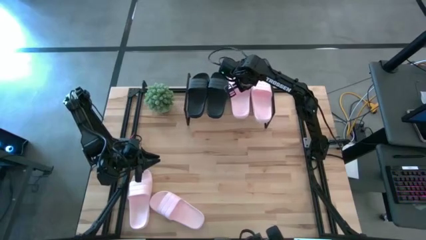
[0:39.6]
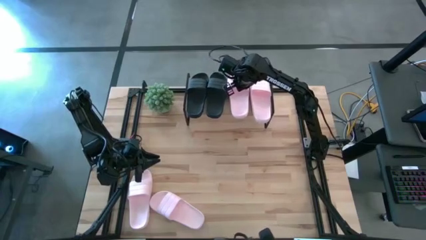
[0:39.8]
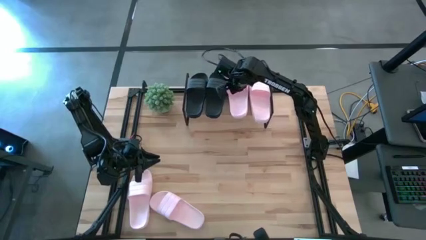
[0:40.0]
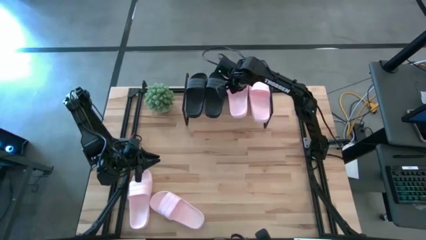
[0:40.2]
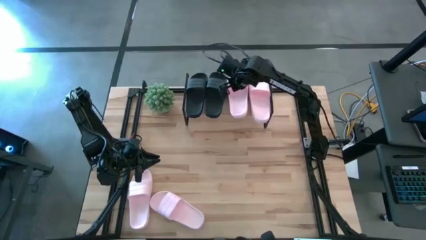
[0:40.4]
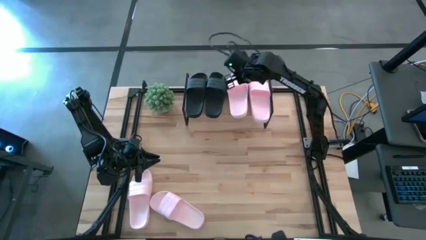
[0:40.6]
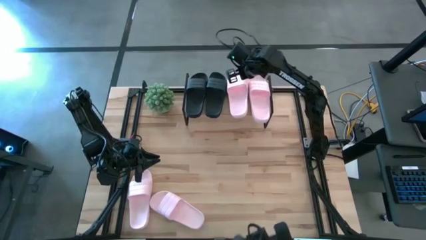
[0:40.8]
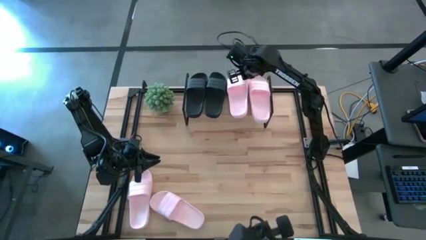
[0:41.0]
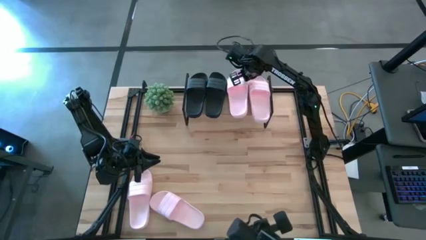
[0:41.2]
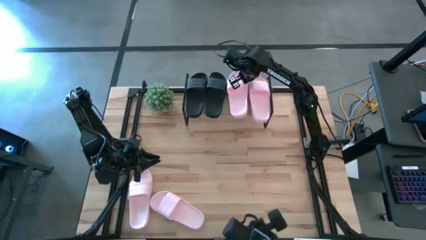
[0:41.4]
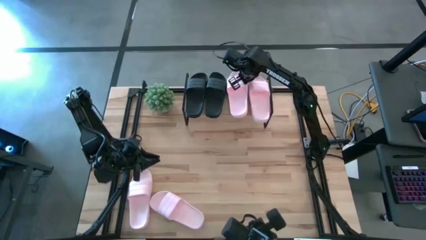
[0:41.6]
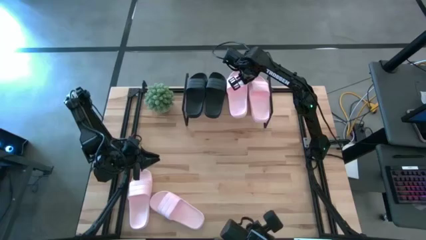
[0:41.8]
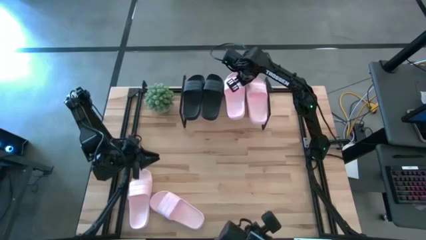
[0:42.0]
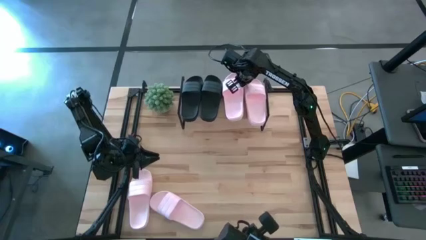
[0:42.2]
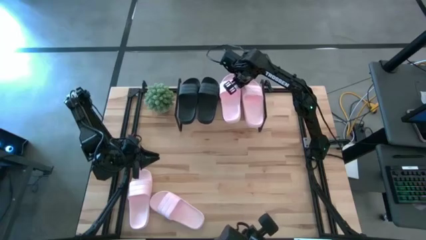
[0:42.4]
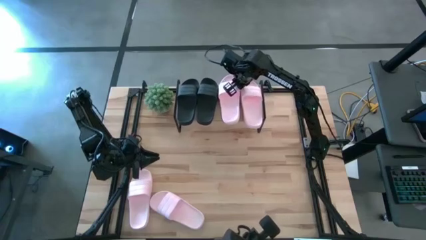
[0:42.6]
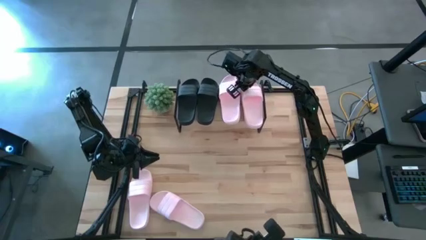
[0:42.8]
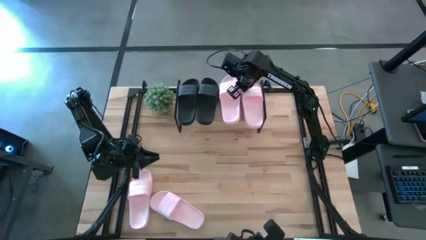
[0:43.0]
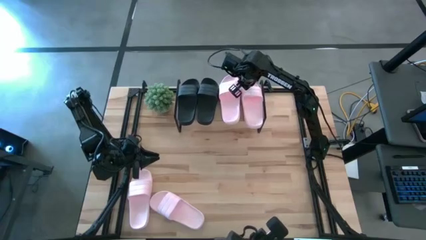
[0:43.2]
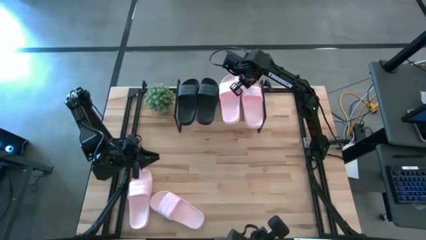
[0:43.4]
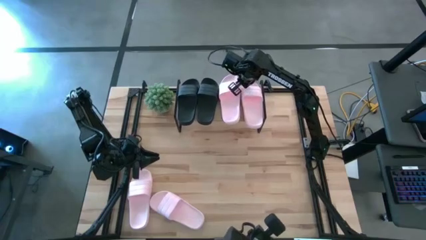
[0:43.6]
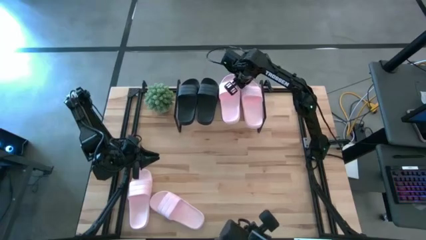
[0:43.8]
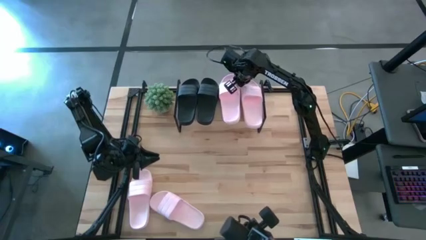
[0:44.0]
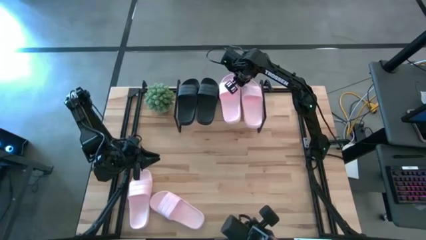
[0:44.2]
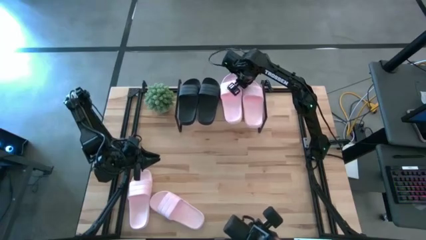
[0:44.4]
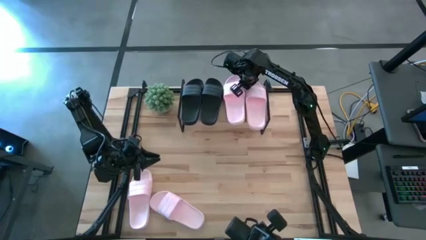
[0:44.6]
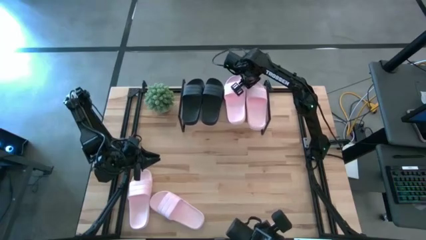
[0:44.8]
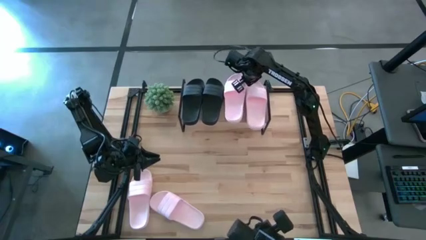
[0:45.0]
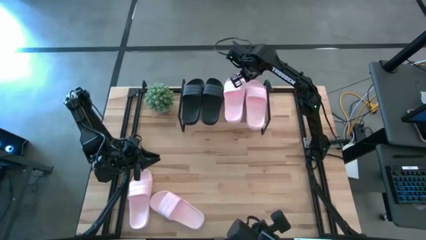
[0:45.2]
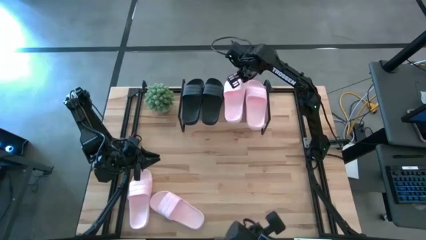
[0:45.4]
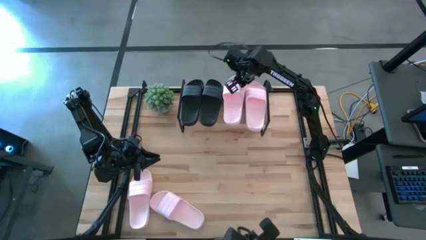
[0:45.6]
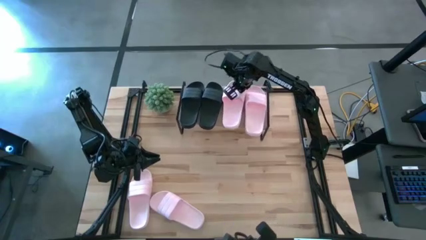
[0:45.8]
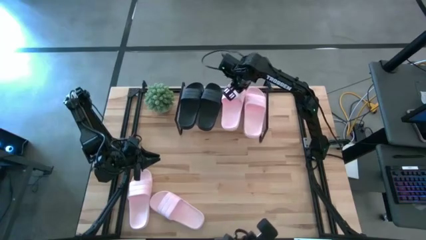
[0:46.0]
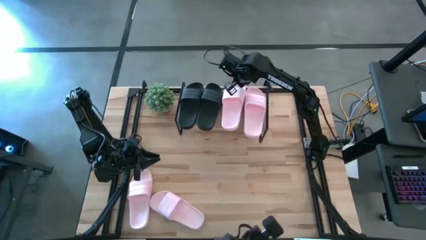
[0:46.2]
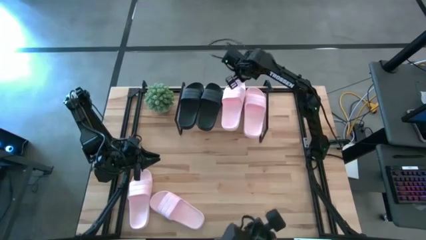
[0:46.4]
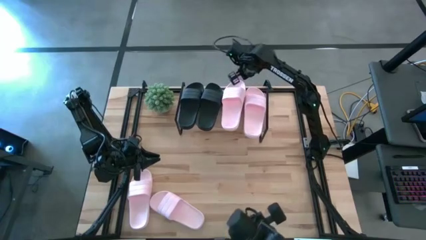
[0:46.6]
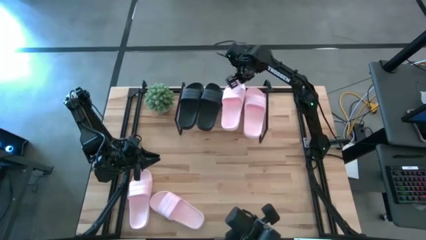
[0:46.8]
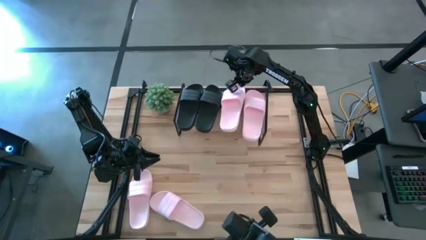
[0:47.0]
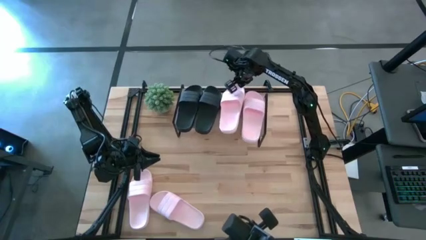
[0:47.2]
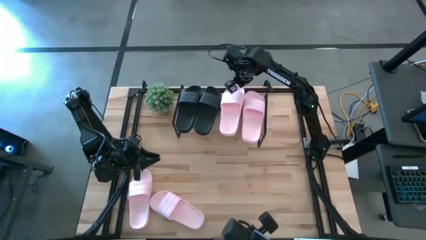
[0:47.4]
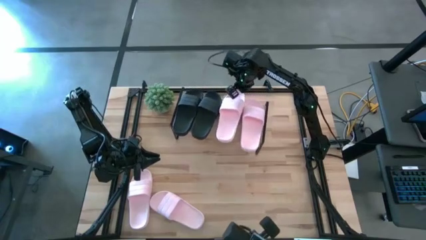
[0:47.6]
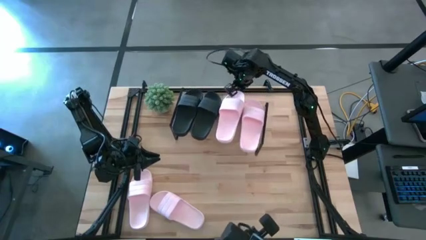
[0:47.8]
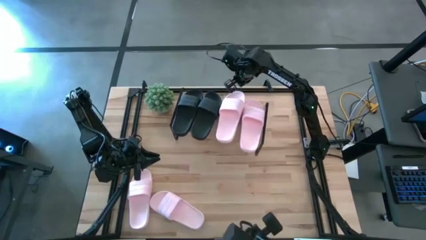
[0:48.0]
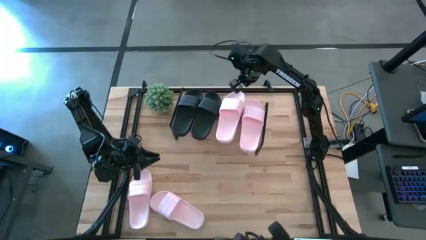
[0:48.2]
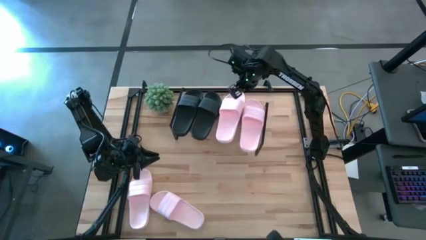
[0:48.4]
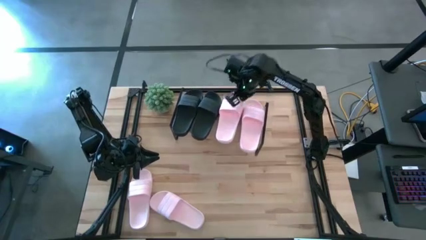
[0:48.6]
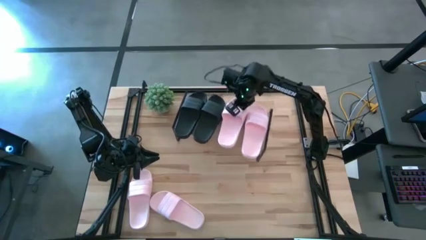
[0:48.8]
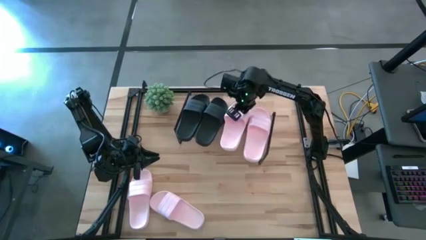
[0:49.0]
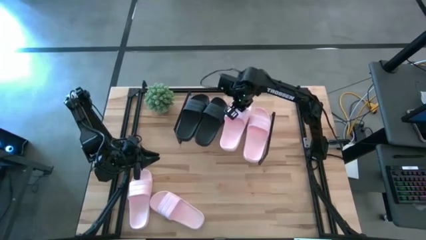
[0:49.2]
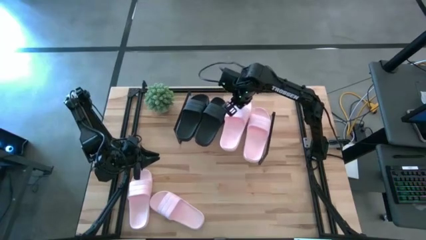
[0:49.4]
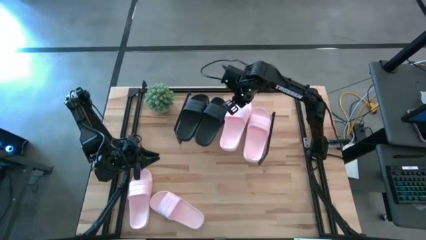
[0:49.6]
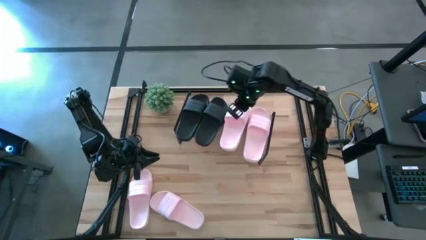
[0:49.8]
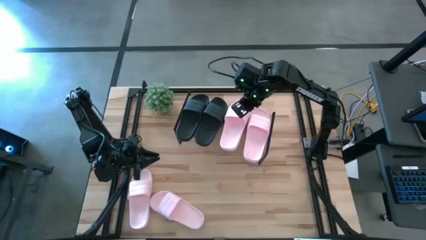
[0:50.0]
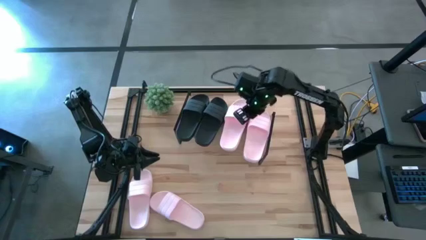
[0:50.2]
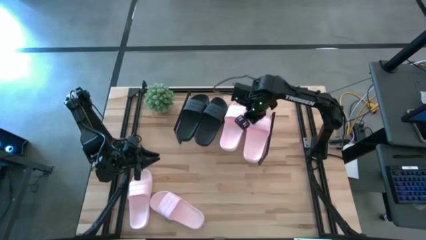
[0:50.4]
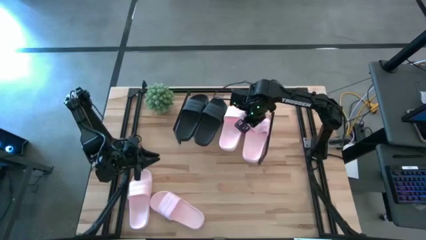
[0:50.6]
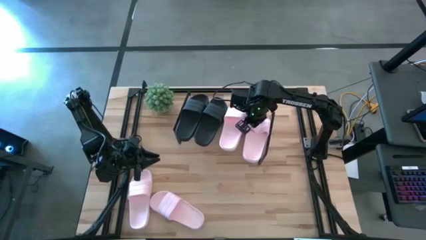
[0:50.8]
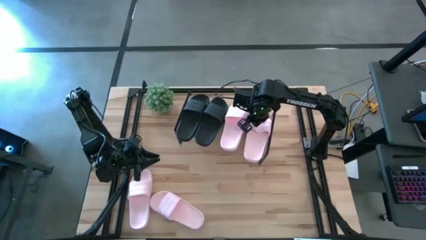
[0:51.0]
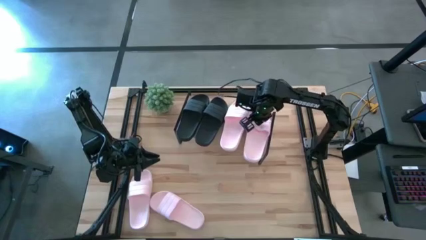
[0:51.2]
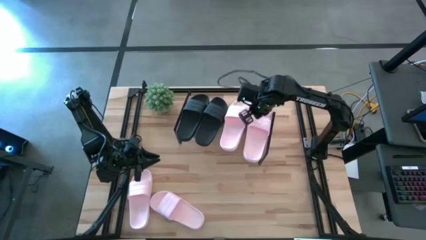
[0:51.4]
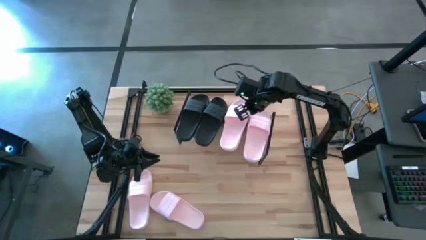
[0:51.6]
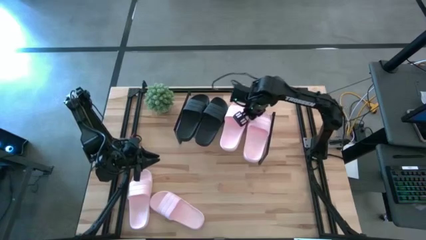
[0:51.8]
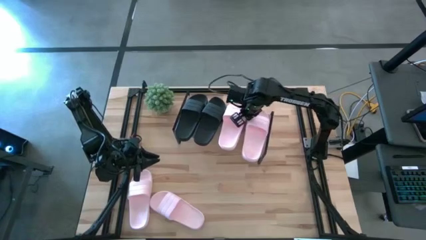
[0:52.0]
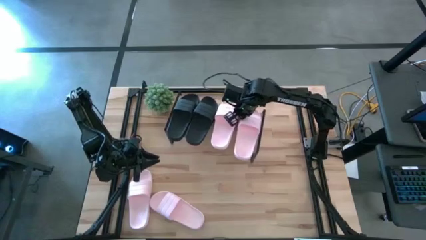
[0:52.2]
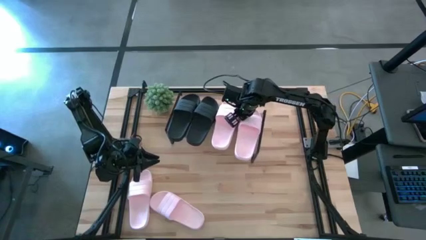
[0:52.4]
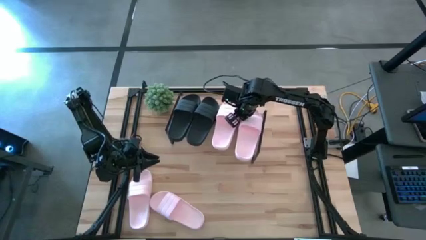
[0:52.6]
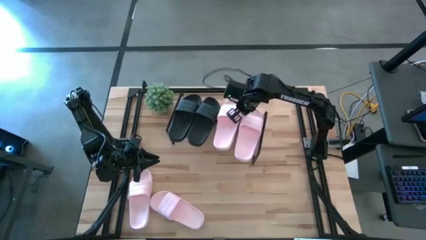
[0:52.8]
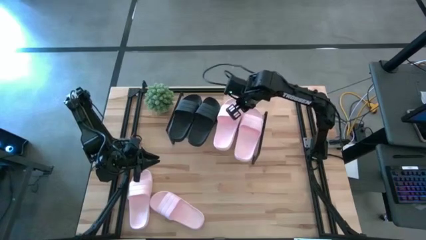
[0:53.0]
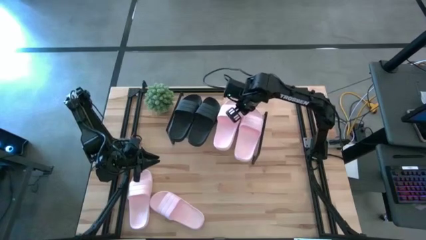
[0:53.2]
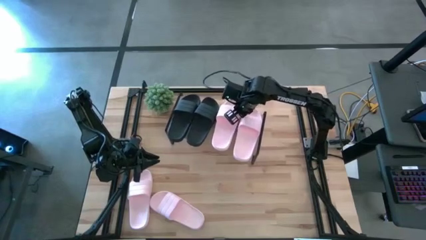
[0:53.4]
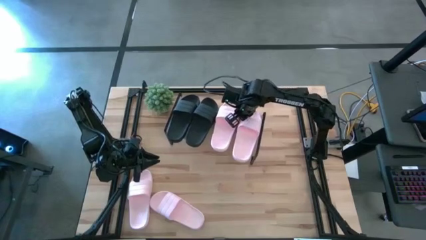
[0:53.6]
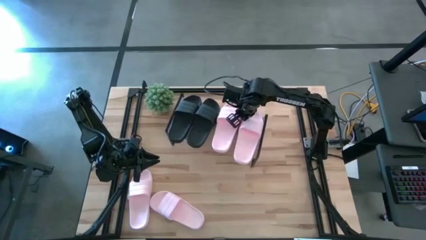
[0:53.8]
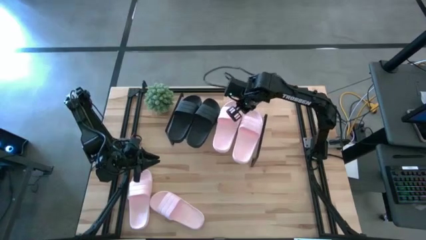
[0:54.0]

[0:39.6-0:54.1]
Task: Pick and place slides into the shelf
Put the pink slipper on the shelf

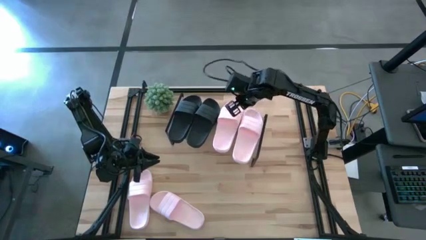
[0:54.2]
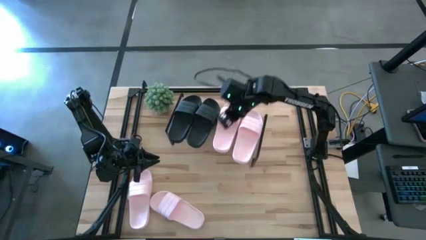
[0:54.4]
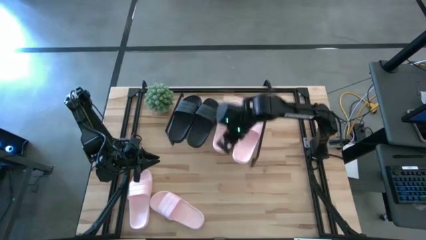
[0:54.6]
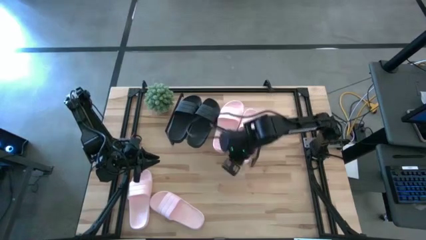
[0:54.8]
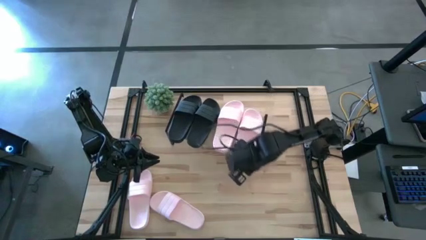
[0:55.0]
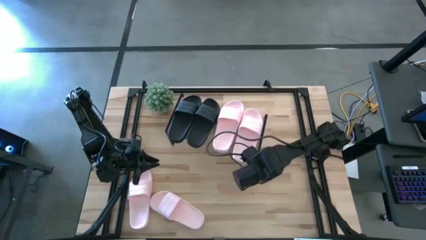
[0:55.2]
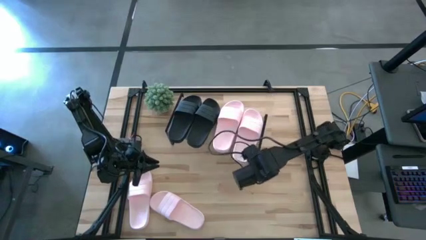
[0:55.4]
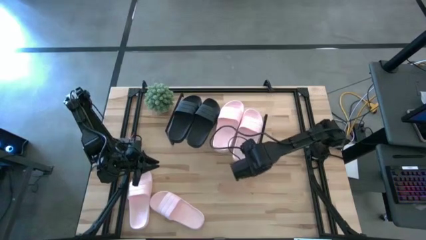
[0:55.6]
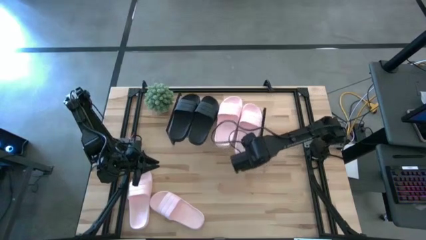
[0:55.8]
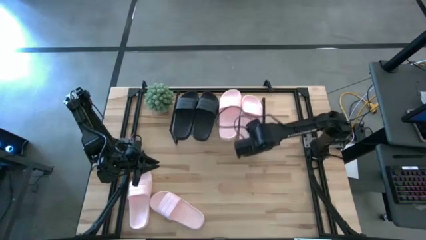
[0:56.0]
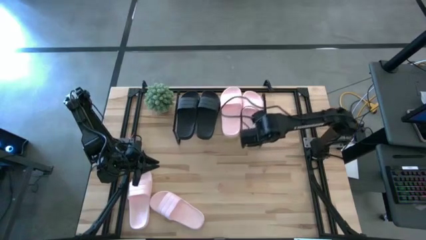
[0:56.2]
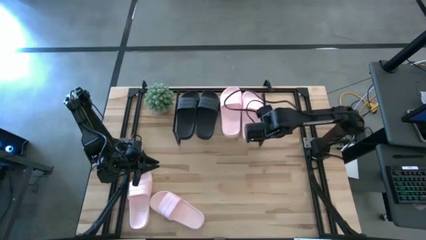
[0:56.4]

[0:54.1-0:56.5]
Adjust the shelf on the table
